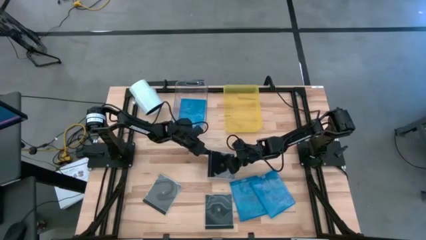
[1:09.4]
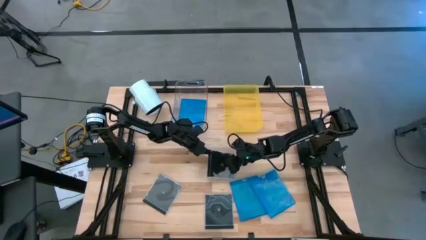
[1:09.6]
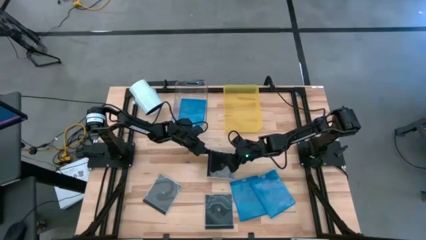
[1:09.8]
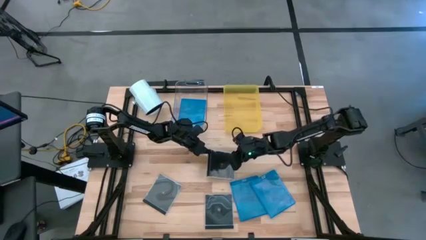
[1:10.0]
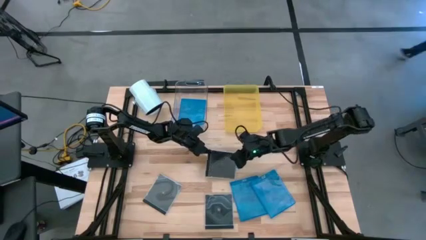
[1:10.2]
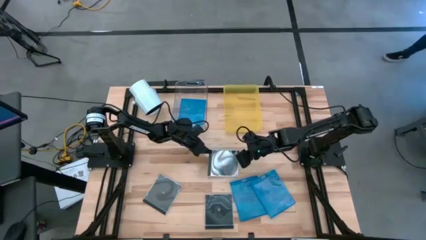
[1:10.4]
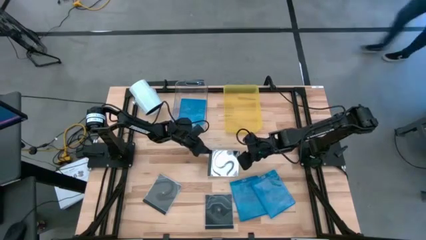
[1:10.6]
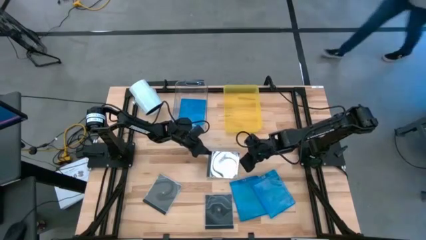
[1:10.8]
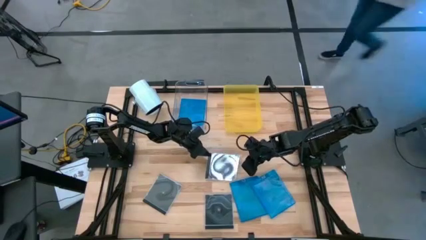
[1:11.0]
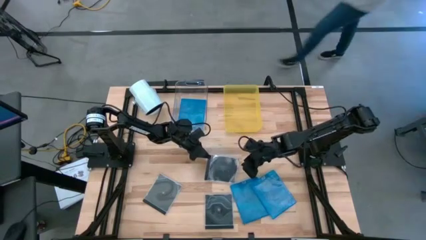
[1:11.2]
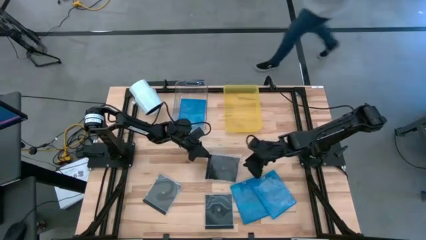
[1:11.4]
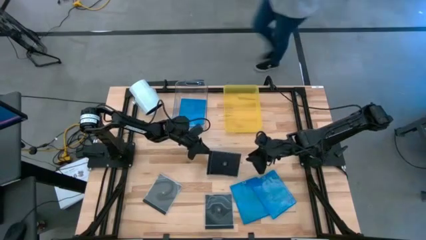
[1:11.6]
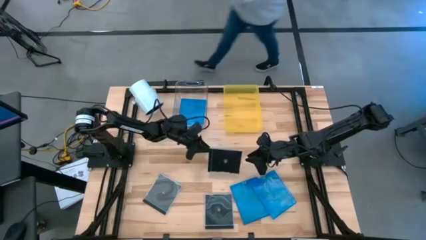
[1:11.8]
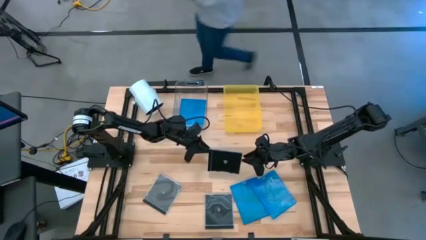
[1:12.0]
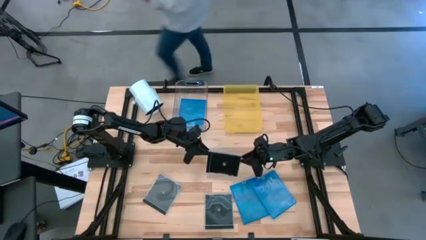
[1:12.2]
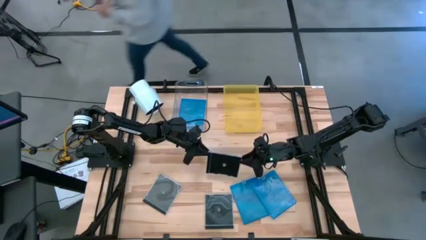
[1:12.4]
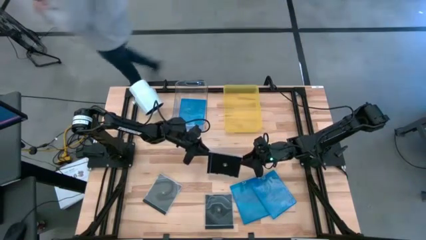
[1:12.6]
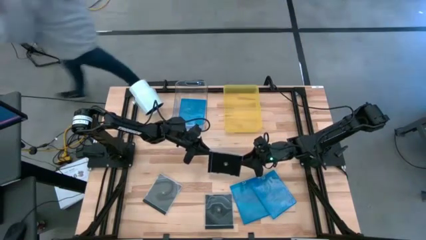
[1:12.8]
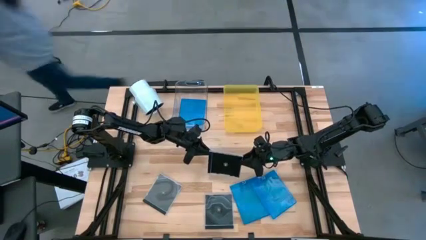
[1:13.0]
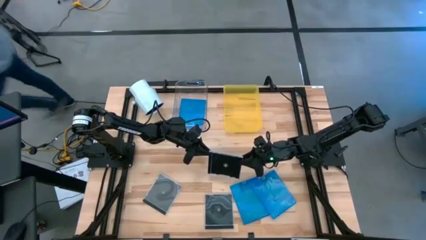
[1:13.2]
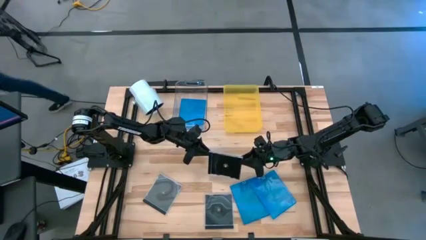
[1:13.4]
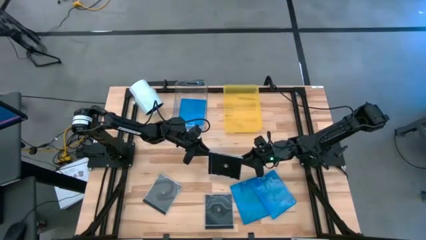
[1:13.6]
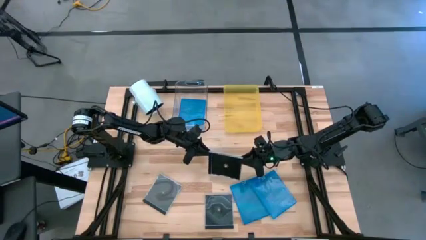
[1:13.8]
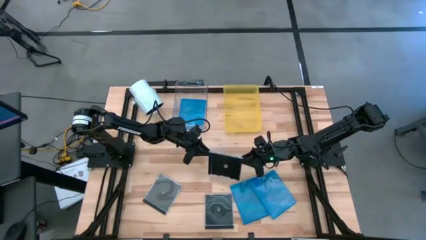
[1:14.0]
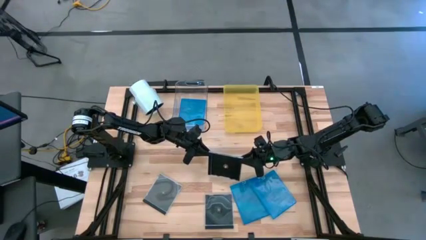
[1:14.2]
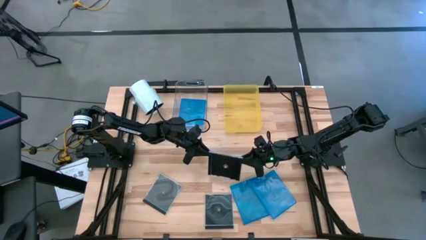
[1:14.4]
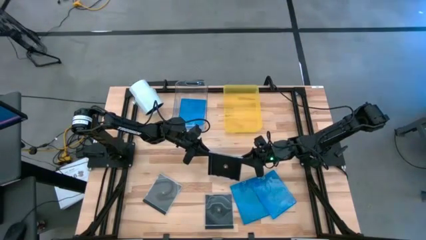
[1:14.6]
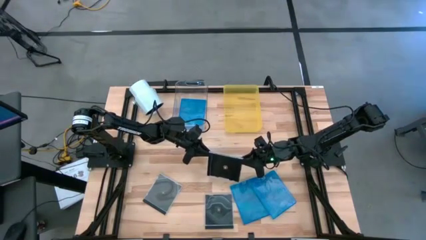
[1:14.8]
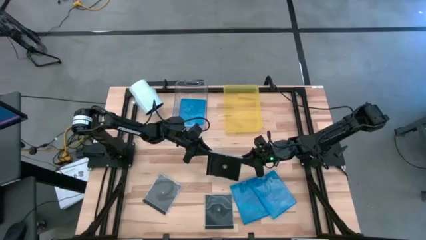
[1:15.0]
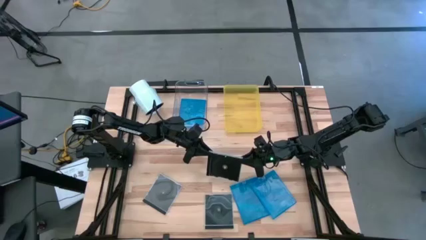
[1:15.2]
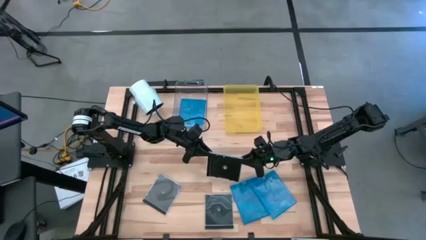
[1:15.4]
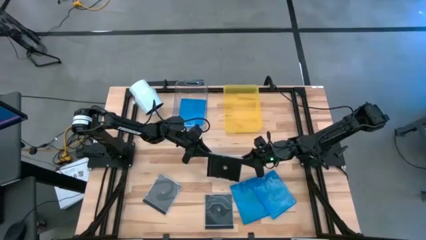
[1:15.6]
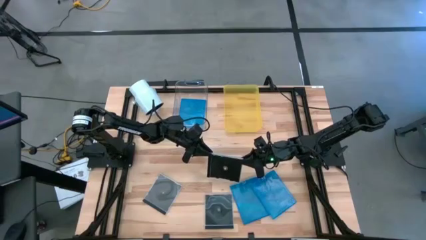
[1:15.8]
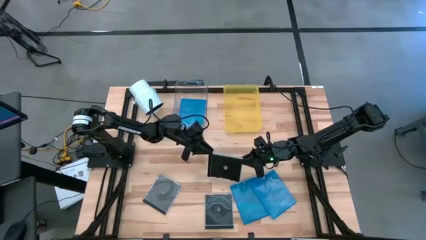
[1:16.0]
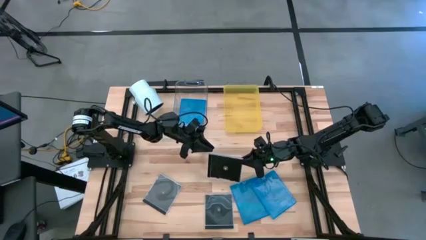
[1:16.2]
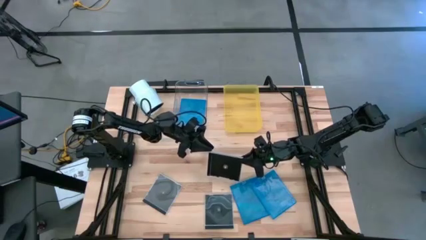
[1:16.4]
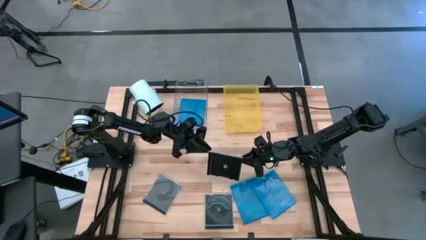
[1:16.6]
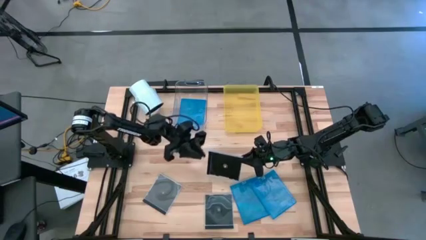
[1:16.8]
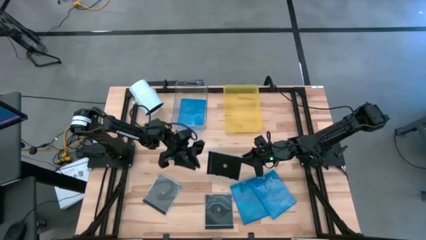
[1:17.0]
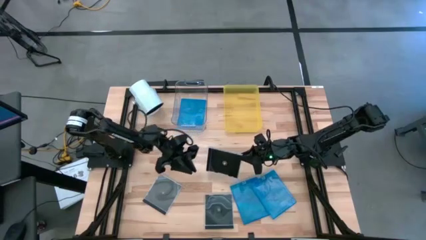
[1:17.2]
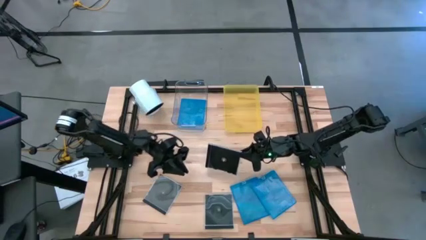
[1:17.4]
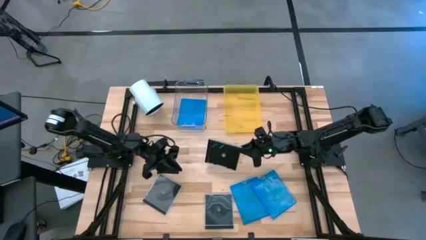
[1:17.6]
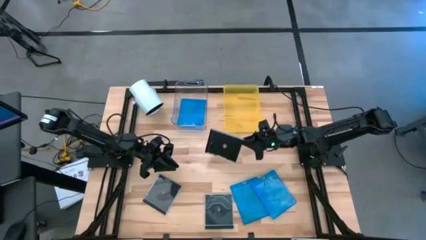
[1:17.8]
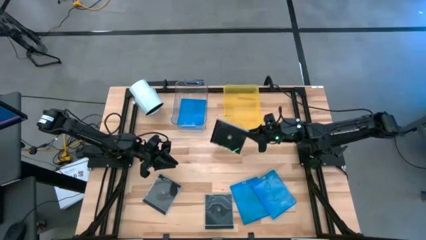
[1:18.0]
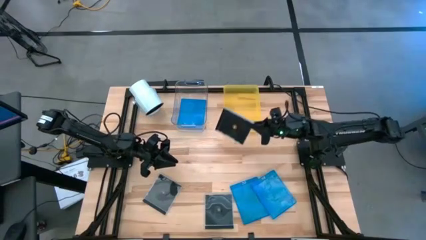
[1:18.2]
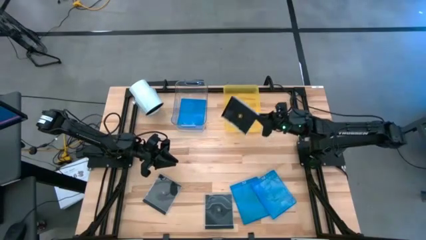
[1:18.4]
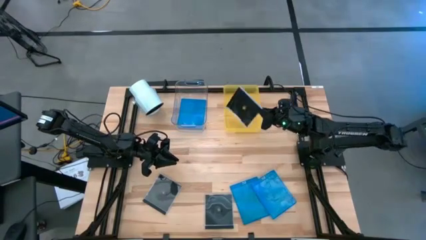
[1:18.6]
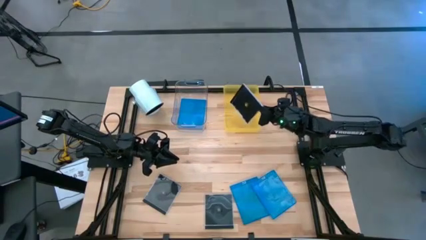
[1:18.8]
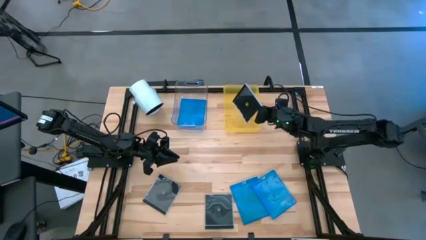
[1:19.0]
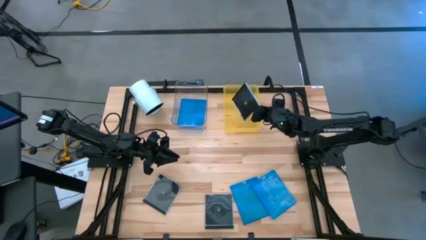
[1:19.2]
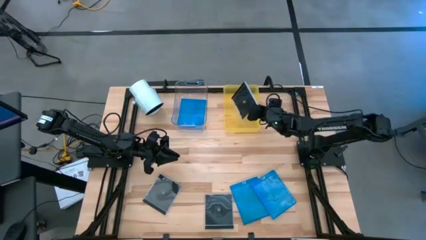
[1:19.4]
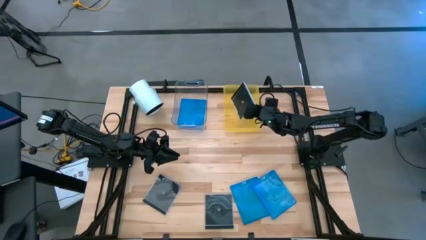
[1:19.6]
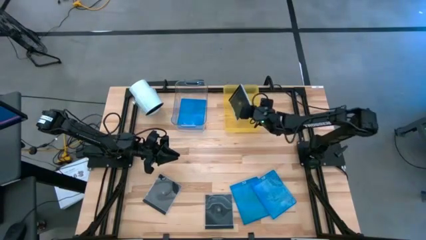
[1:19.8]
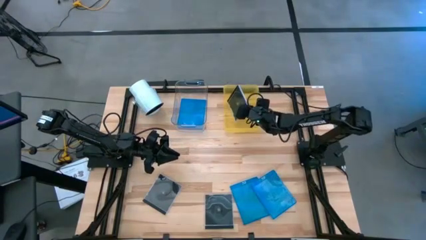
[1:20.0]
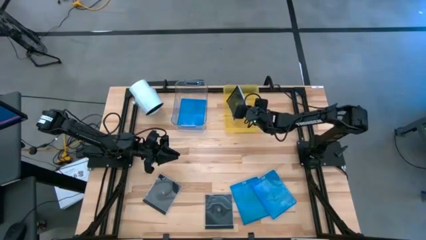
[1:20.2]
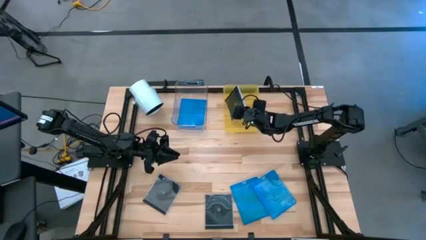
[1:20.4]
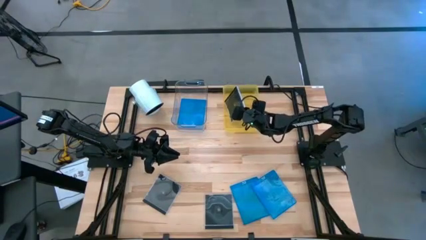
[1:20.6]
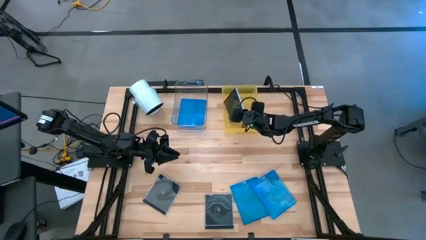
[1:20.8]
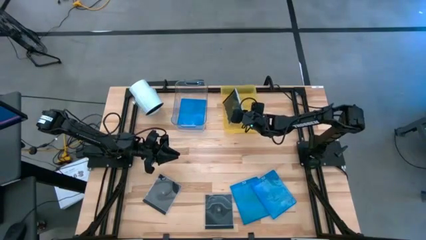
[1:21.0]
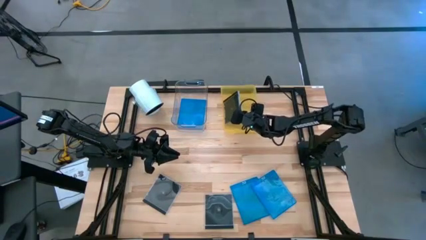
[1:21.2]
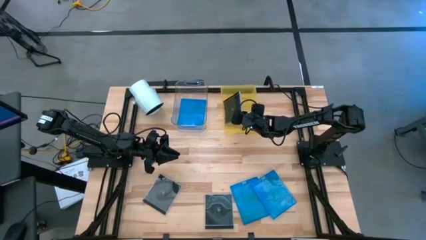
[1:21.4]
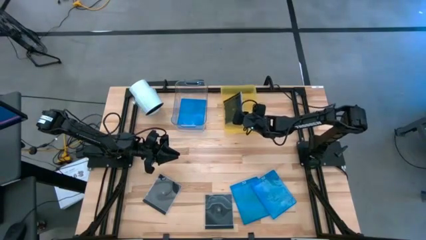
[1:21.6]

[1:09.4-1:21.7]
Task: Pick & place jewel cases by type
Put the top right black CD case into the yellow bin
